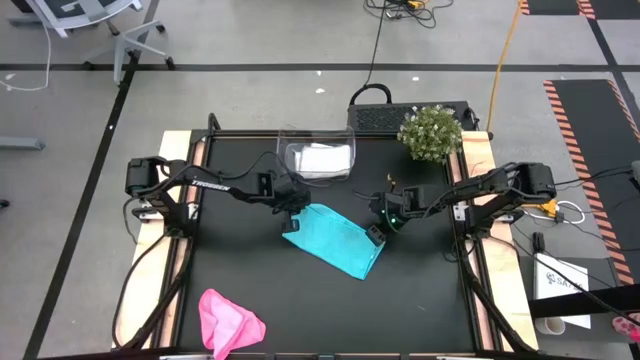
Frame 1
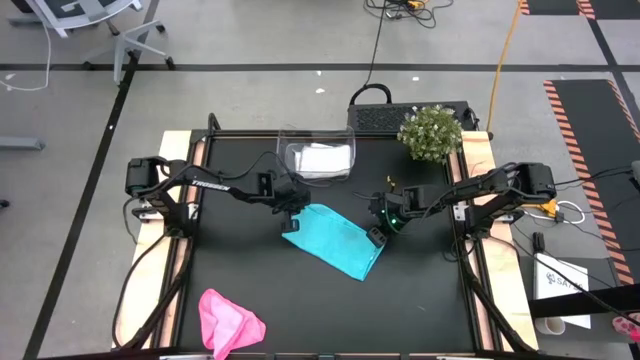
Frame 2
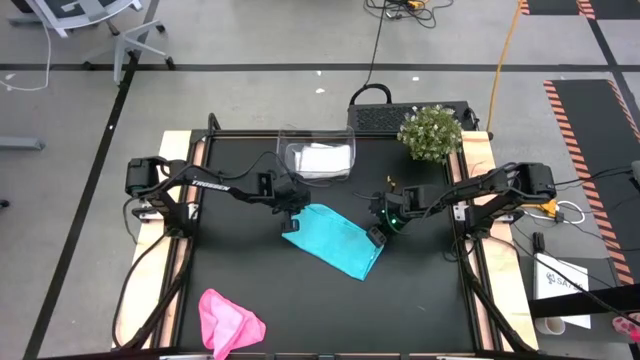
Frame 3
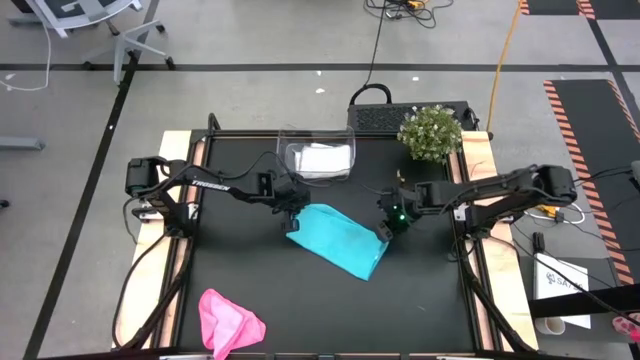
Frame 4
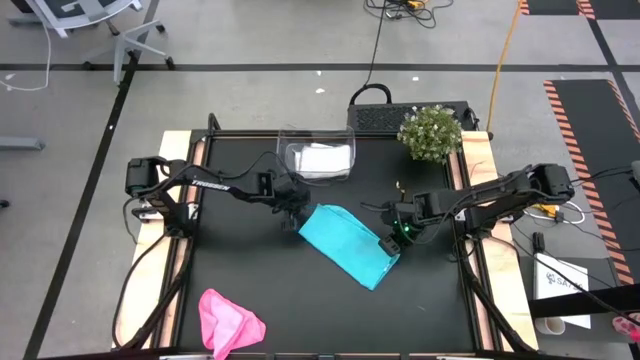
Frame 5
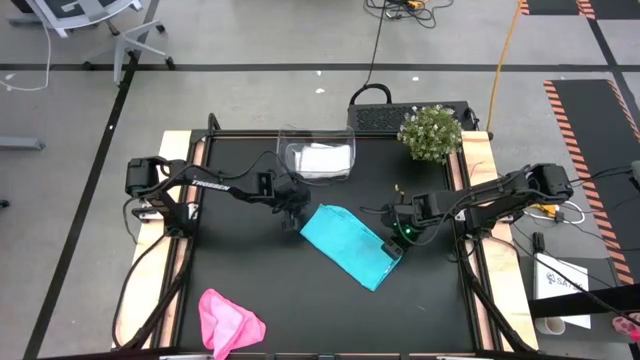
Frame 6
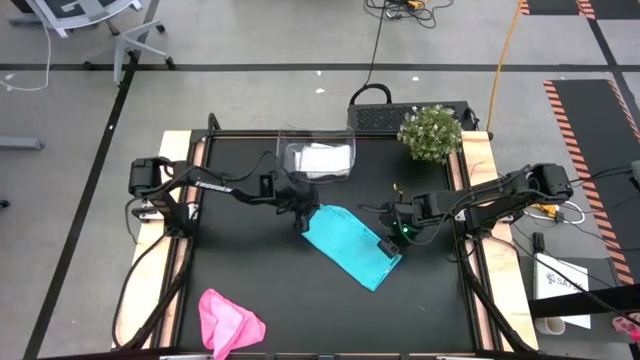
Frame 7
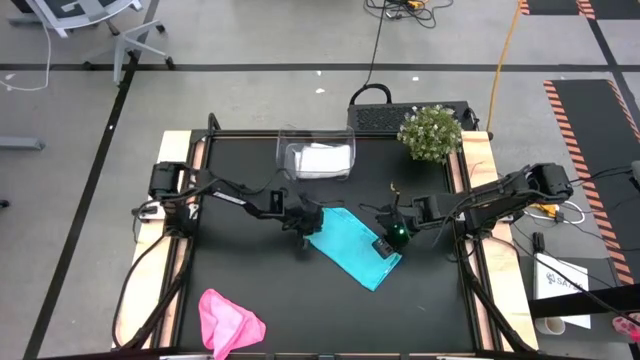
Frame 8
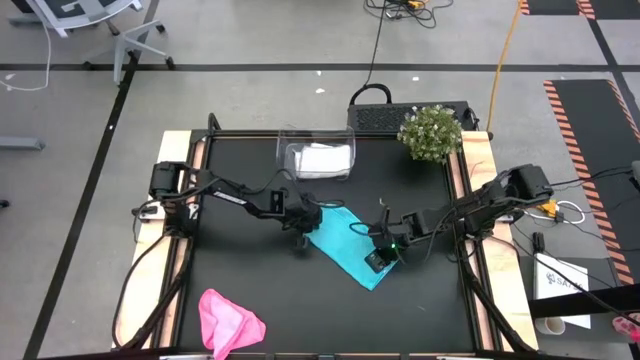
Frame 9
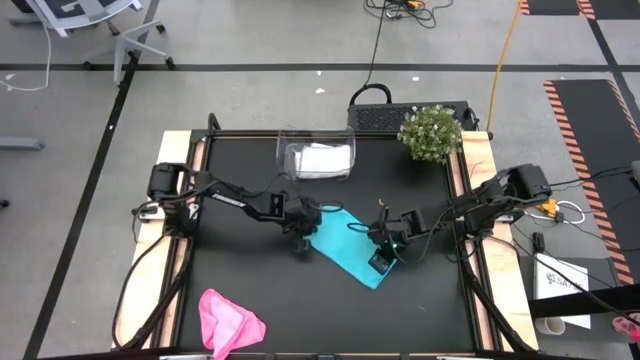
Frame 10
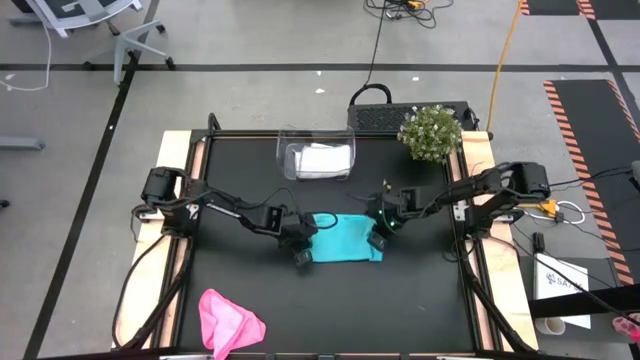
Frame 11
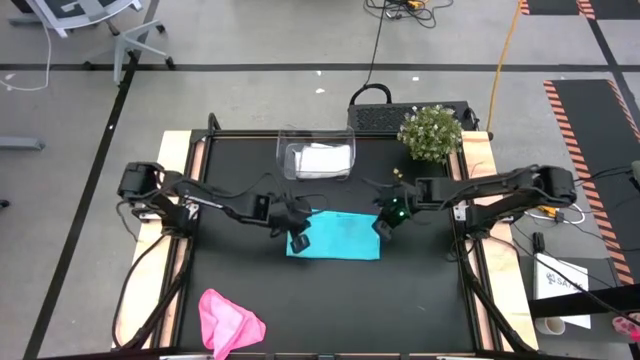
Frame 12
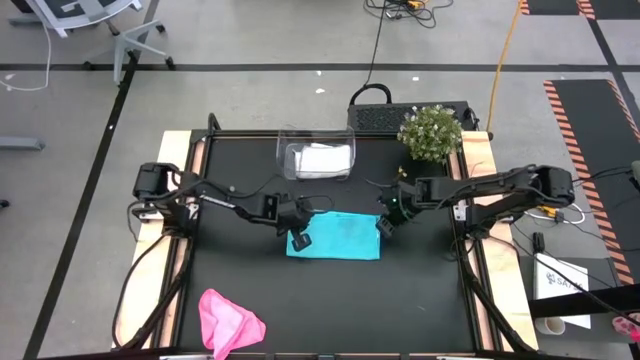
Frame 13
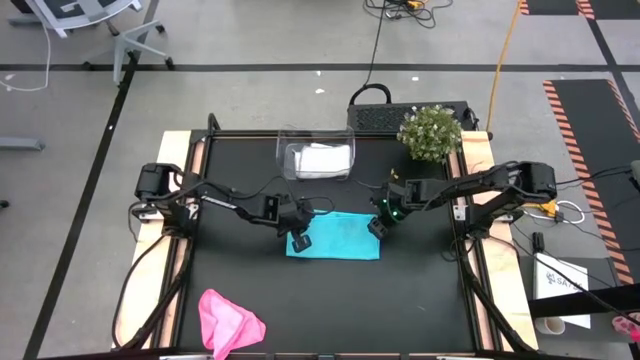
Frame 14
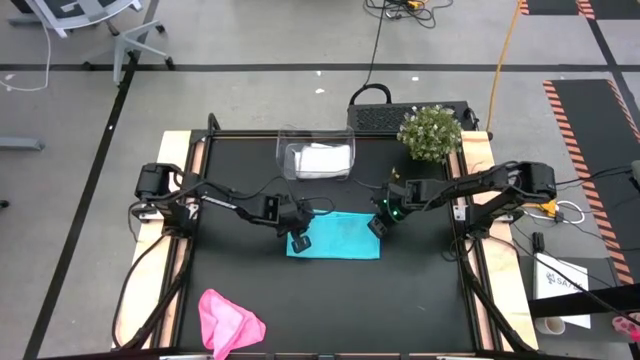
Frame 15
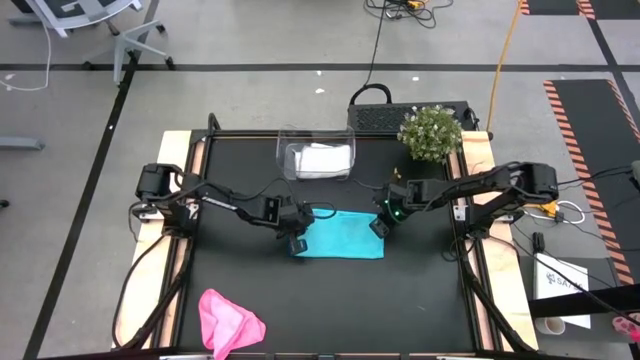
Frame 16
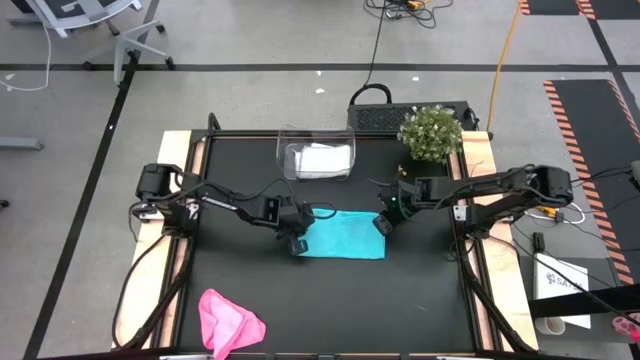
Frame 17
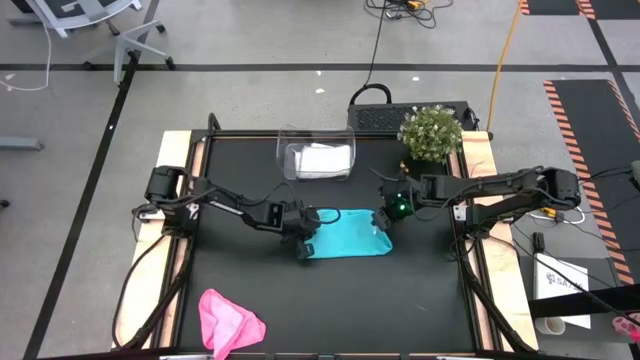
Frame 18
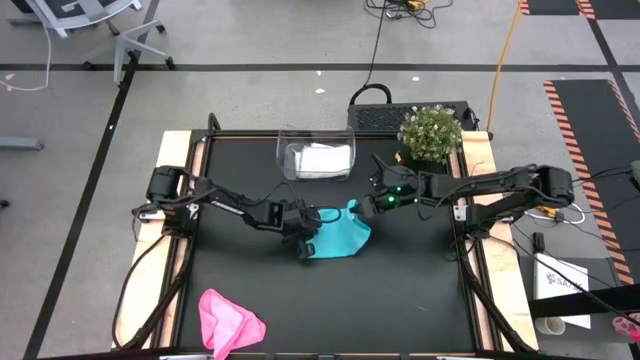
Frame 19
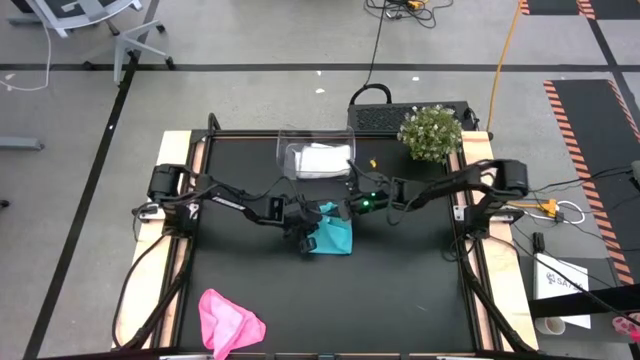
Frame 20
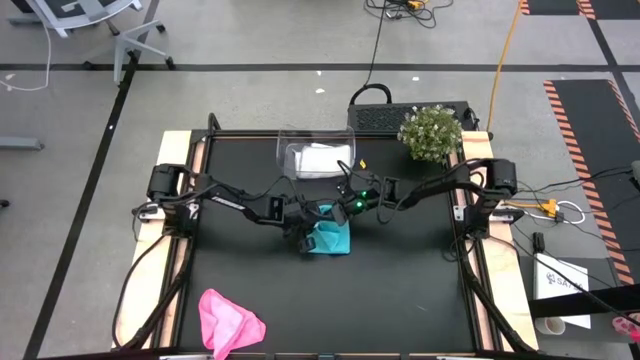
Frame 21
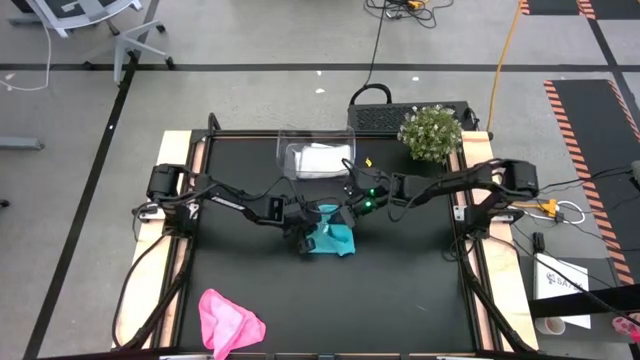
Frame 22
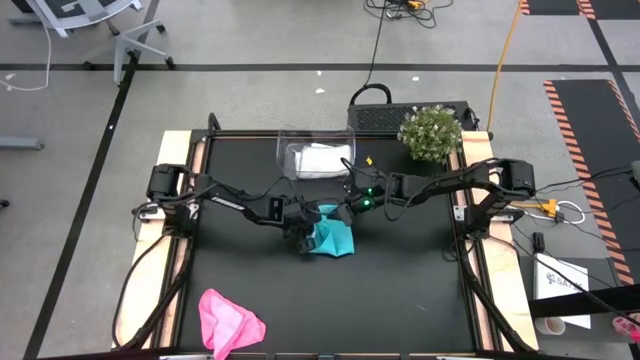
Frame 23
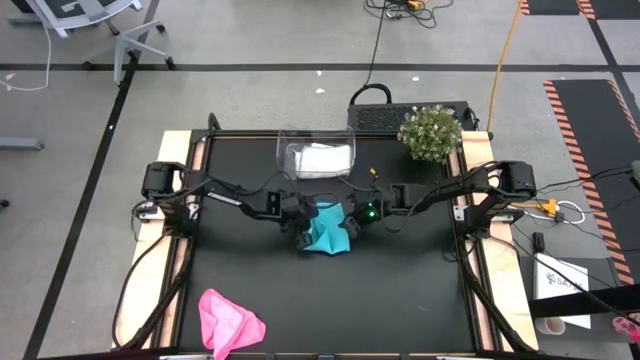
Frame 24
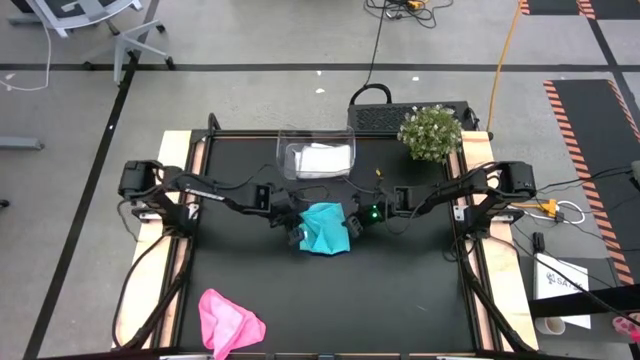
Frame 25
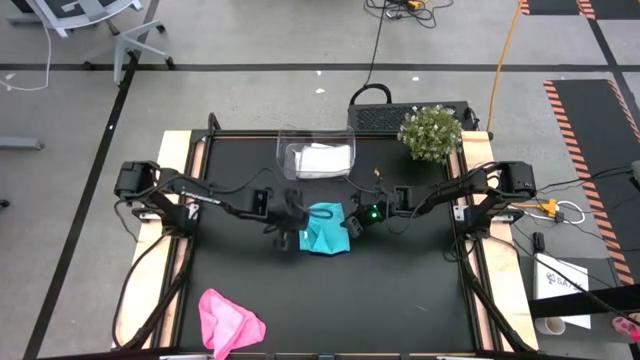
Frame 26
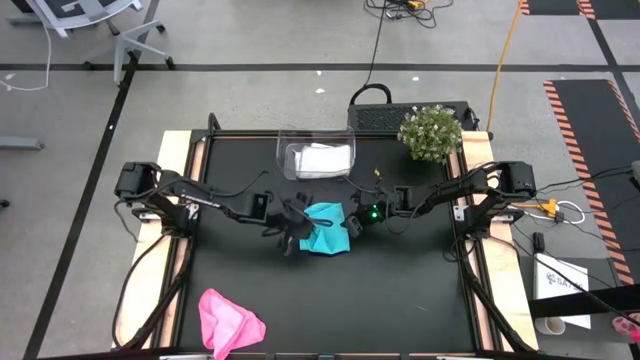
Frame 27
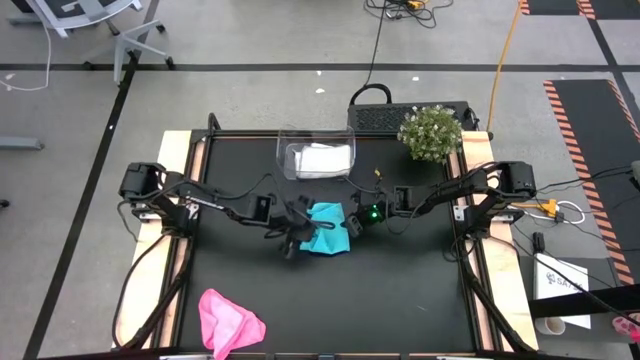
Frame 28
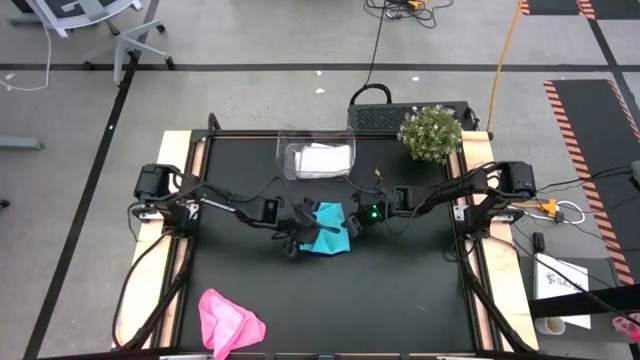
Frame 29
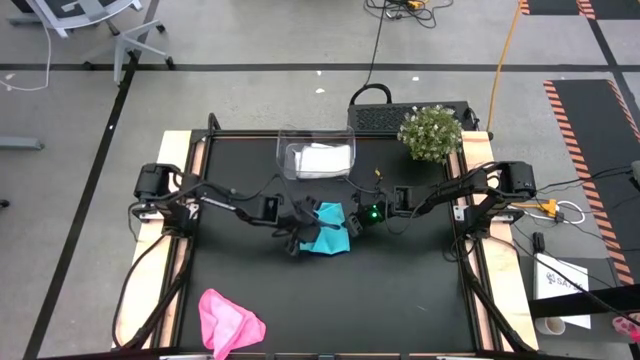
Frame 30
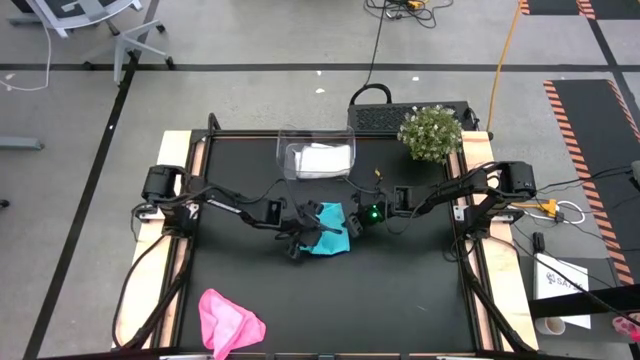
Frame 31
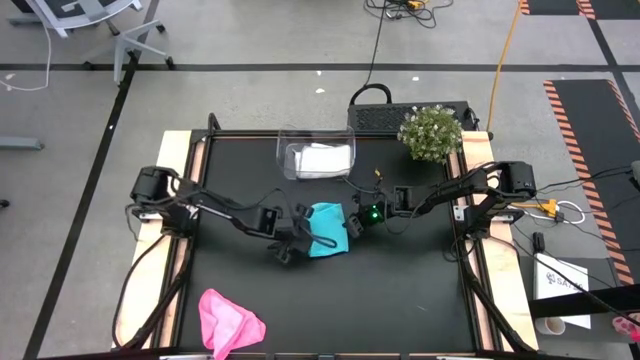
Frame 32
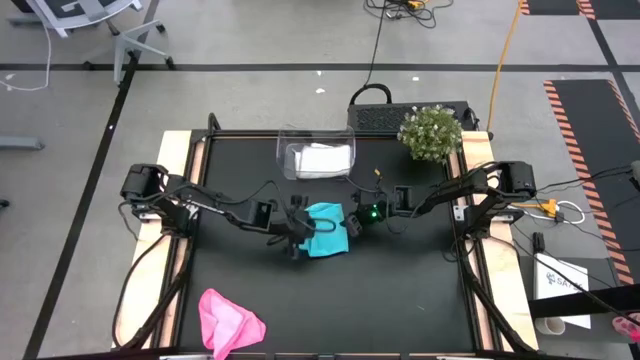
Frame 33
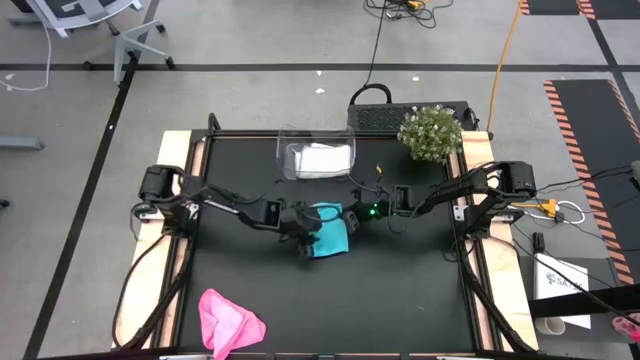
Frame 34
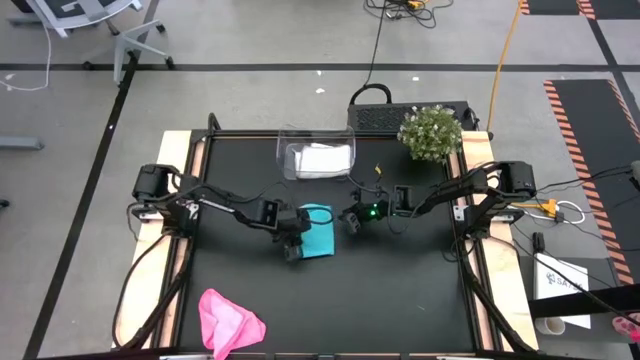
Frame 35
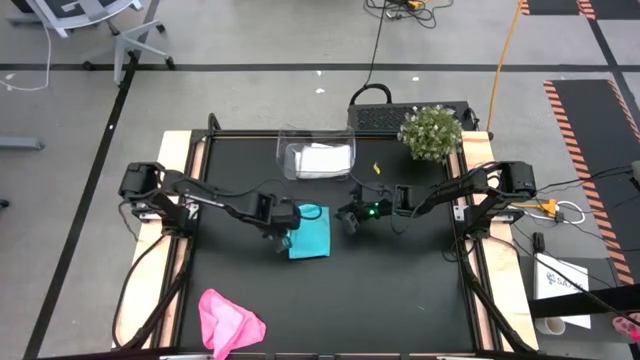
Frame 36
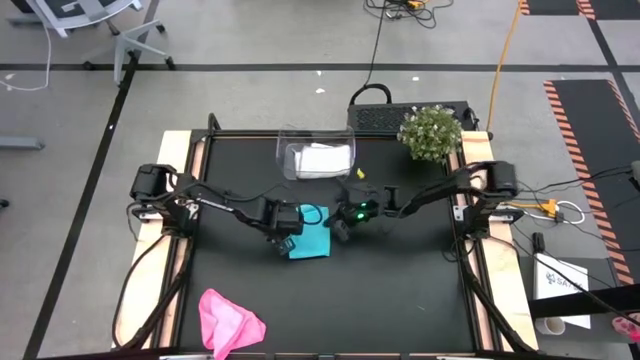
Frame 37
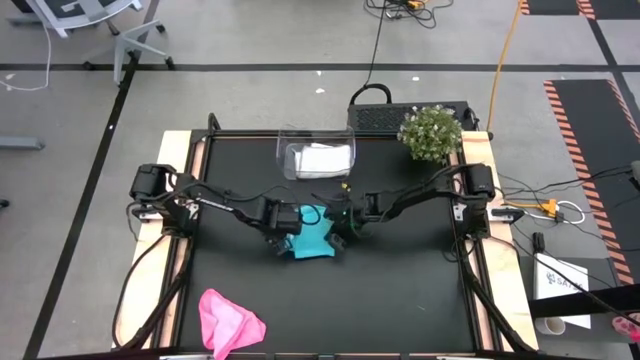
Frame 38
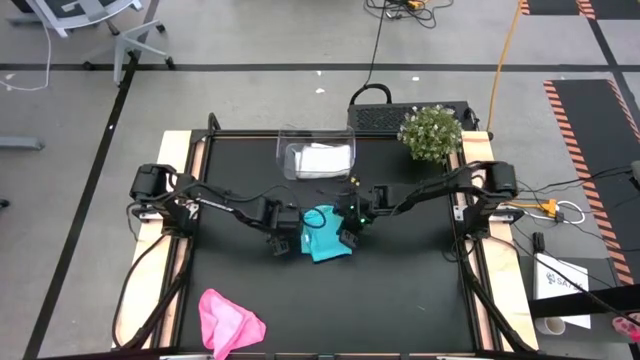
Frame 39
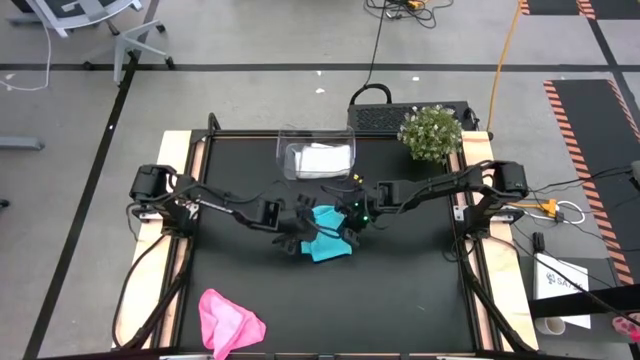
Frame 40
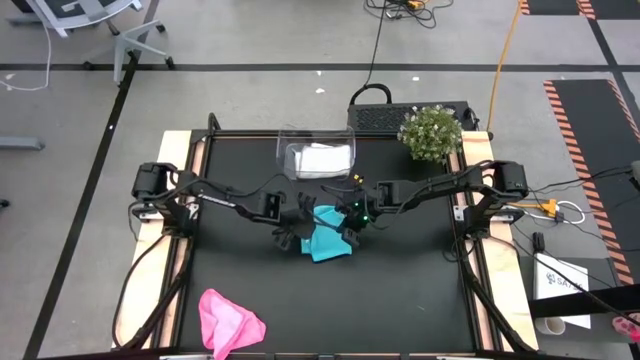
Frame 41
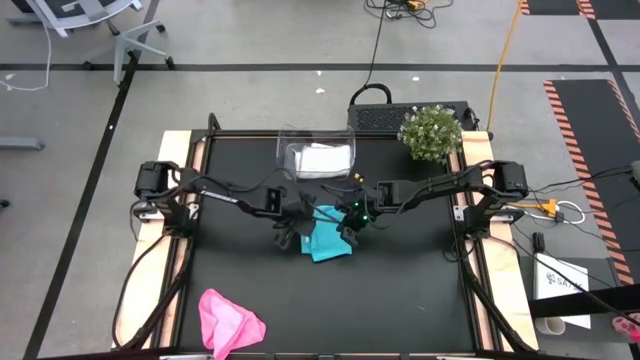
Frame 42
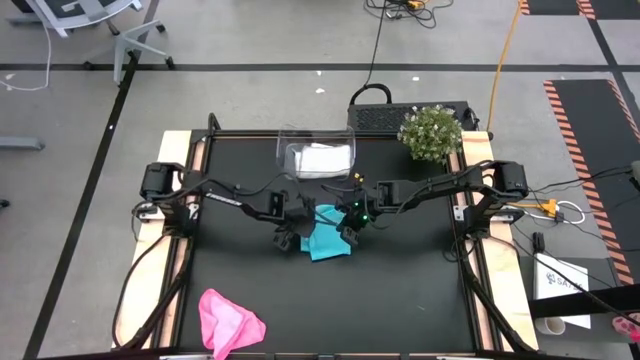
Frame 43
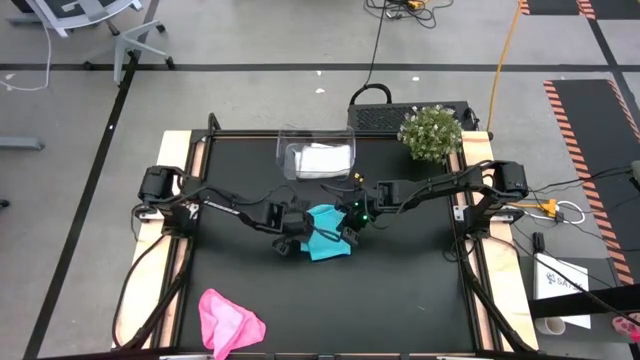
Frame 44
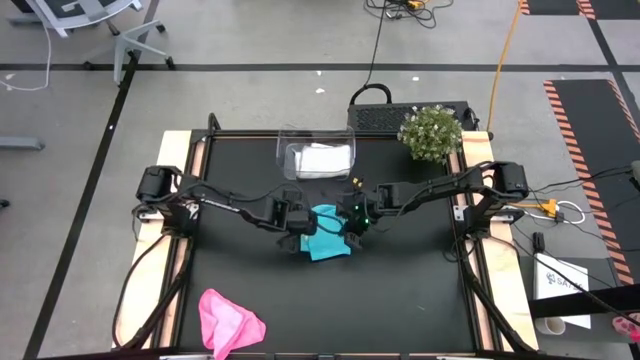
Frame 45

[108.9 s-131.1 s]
Task: Fold microfiber towels
Fold the blue microfiber towel
